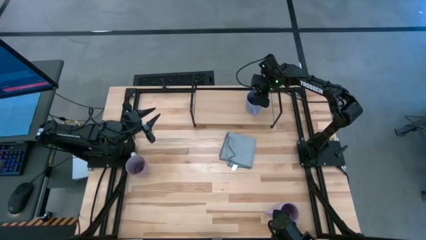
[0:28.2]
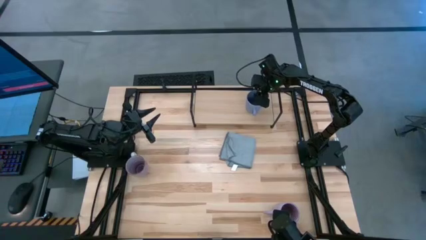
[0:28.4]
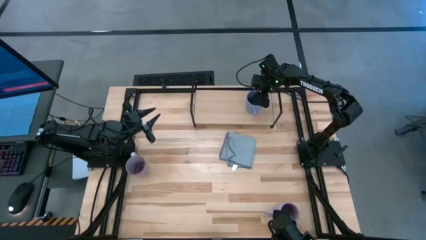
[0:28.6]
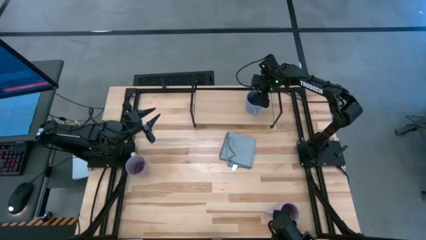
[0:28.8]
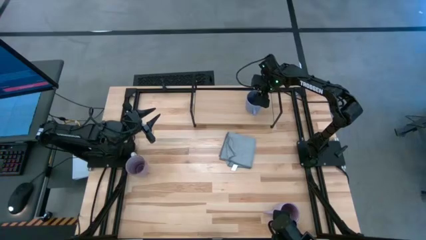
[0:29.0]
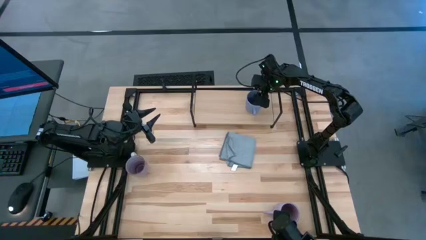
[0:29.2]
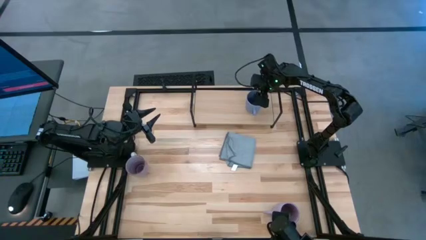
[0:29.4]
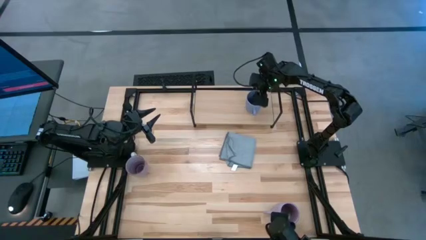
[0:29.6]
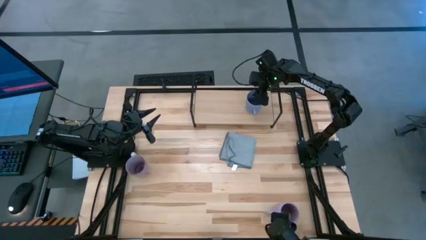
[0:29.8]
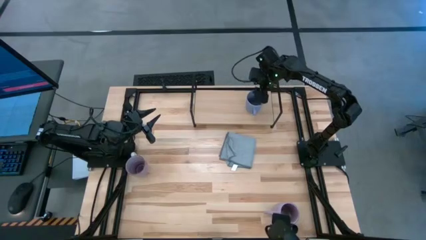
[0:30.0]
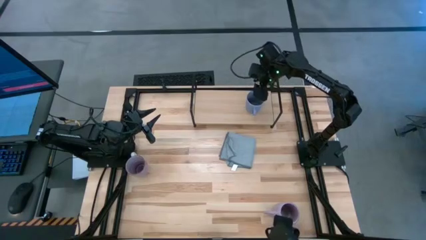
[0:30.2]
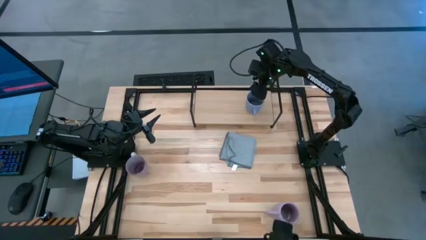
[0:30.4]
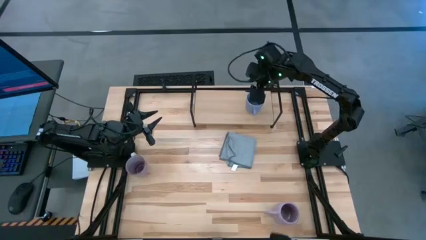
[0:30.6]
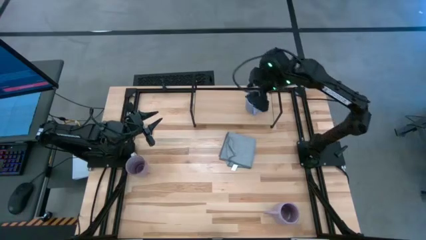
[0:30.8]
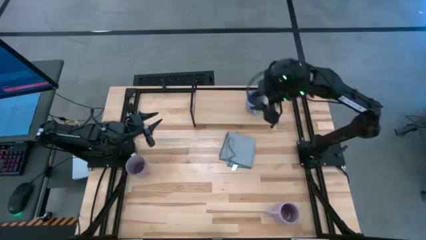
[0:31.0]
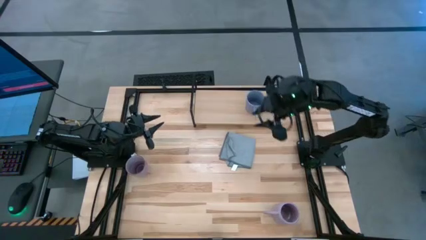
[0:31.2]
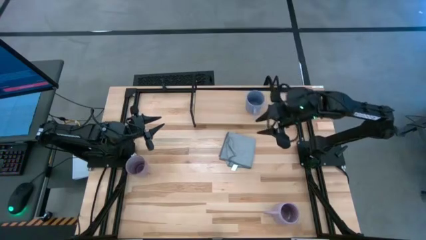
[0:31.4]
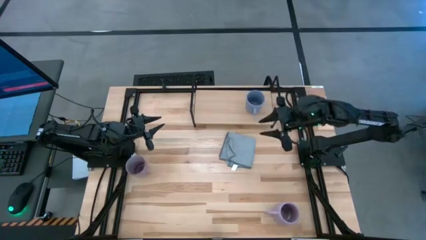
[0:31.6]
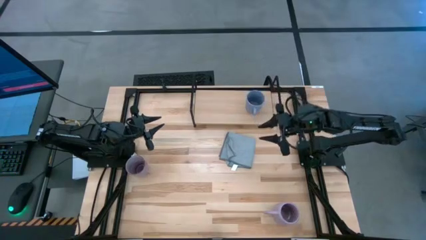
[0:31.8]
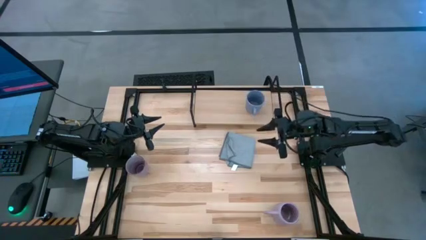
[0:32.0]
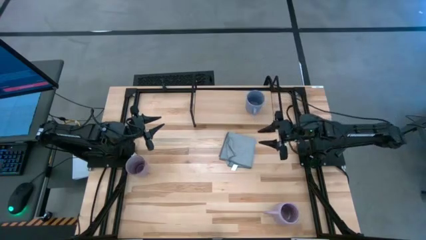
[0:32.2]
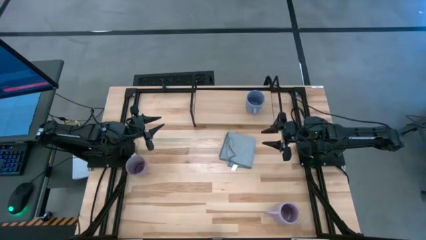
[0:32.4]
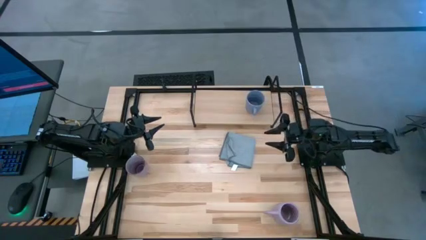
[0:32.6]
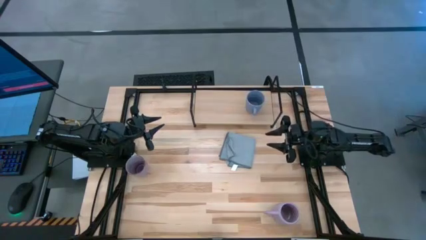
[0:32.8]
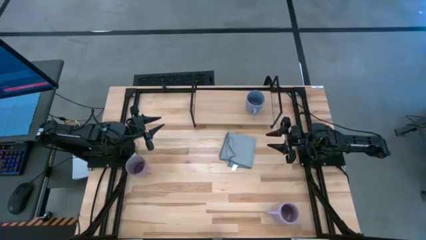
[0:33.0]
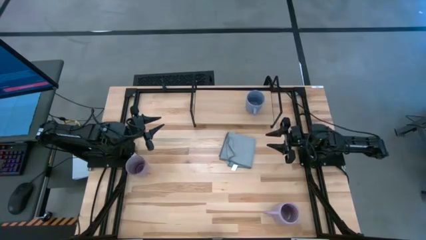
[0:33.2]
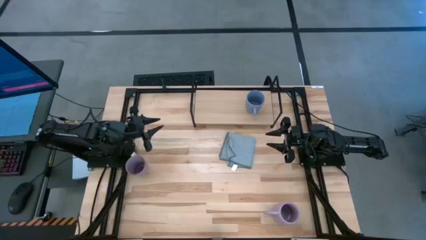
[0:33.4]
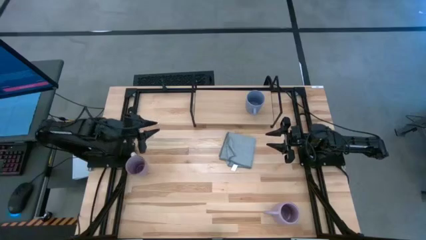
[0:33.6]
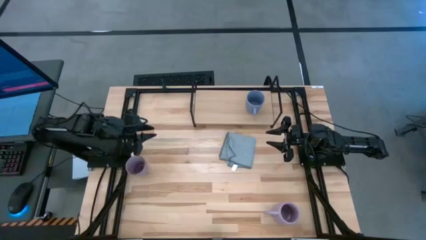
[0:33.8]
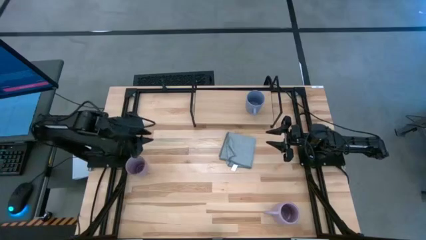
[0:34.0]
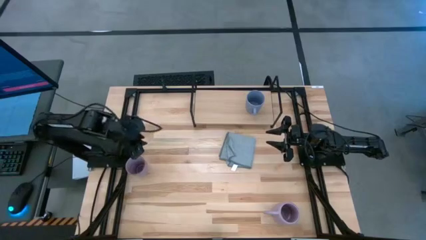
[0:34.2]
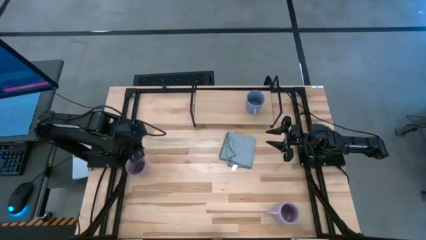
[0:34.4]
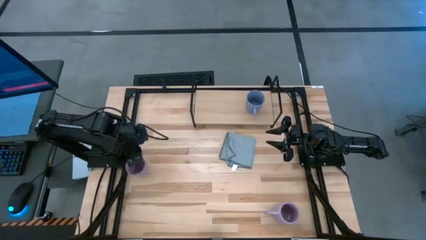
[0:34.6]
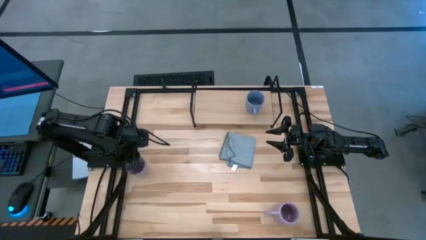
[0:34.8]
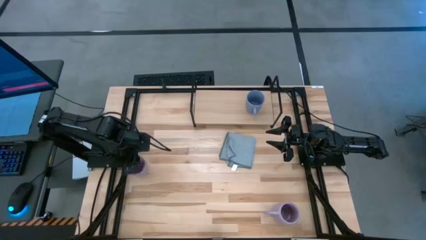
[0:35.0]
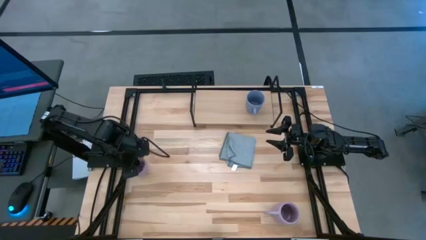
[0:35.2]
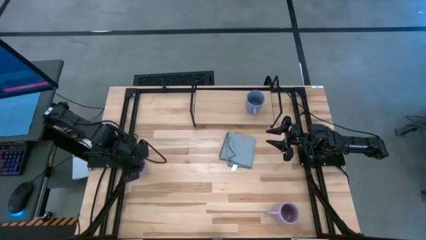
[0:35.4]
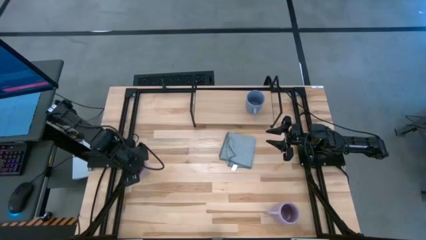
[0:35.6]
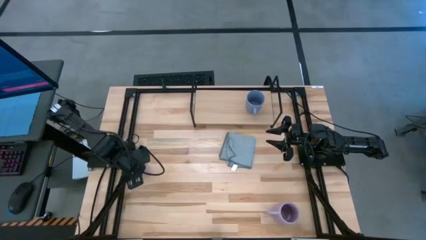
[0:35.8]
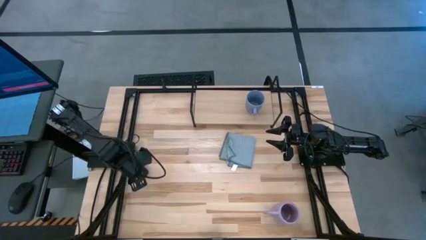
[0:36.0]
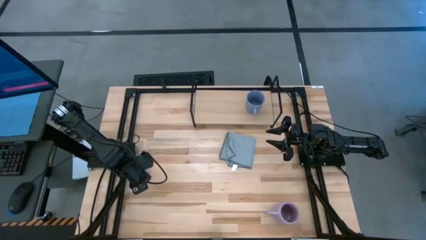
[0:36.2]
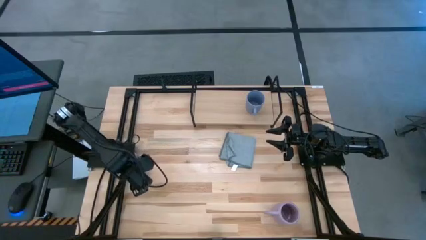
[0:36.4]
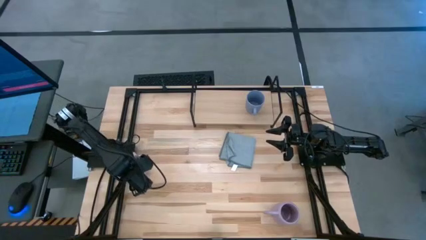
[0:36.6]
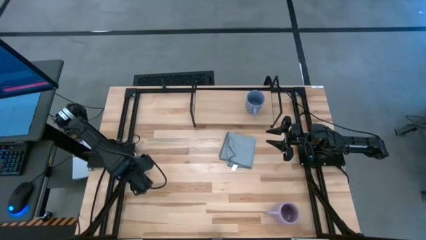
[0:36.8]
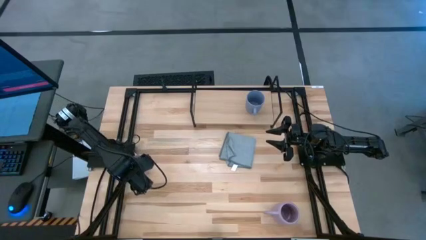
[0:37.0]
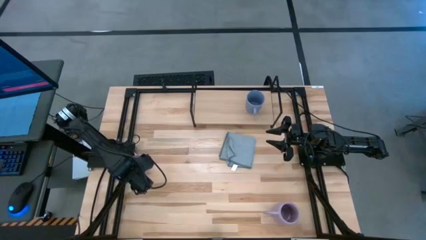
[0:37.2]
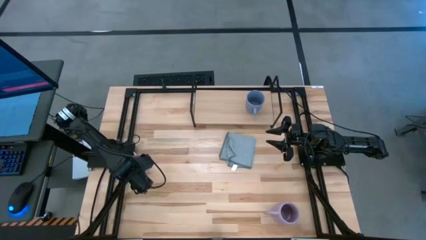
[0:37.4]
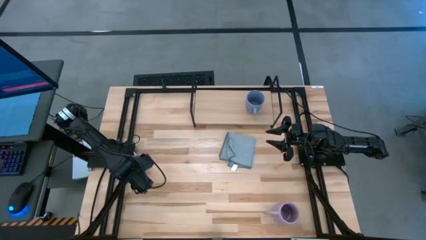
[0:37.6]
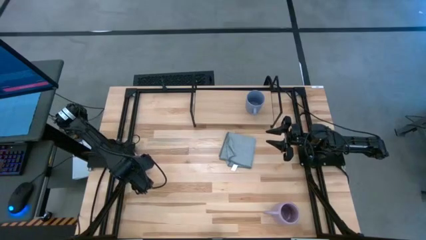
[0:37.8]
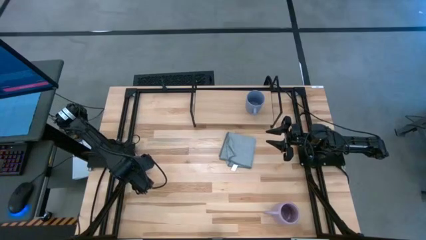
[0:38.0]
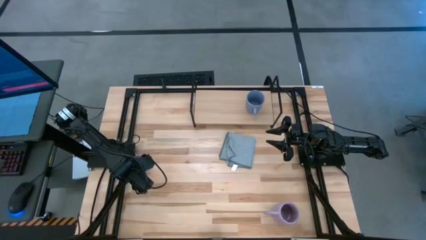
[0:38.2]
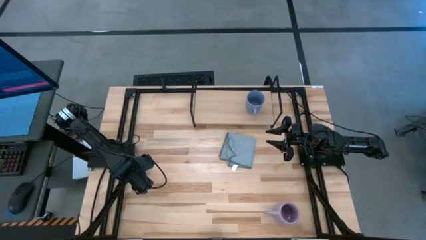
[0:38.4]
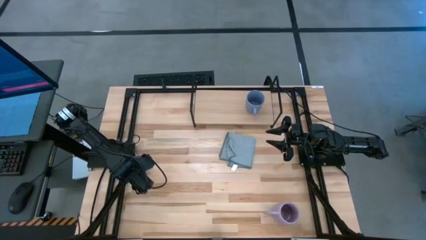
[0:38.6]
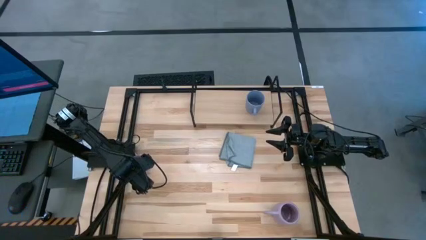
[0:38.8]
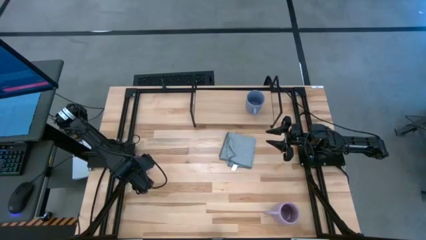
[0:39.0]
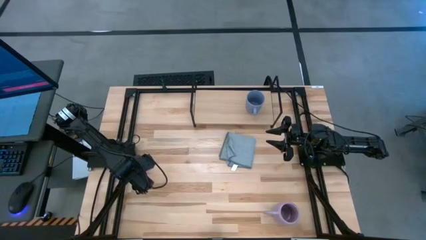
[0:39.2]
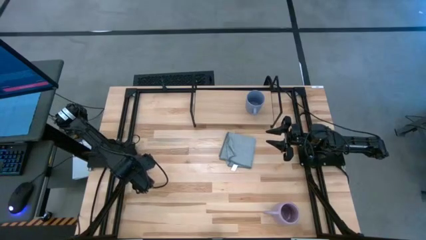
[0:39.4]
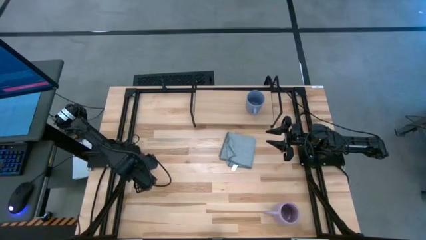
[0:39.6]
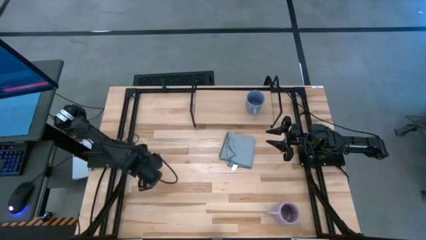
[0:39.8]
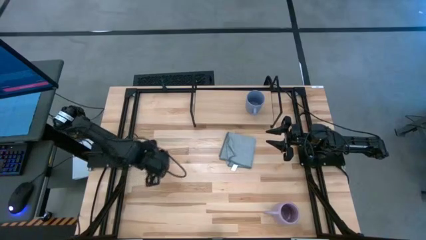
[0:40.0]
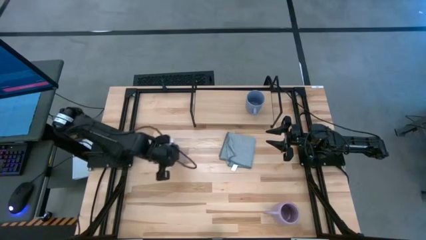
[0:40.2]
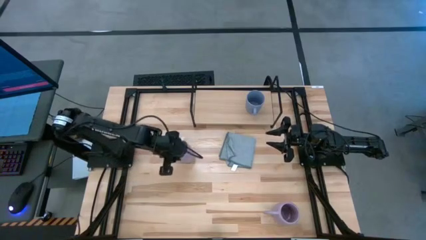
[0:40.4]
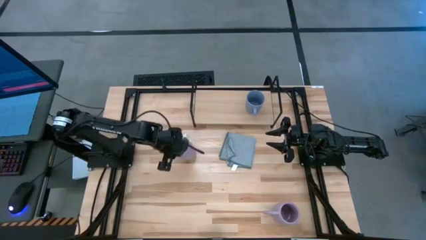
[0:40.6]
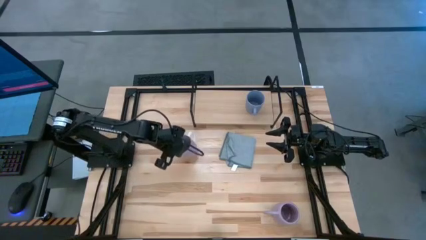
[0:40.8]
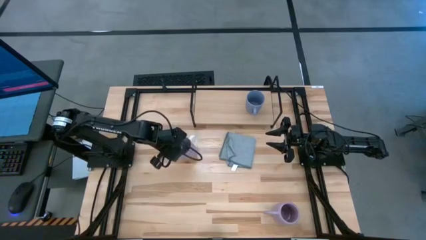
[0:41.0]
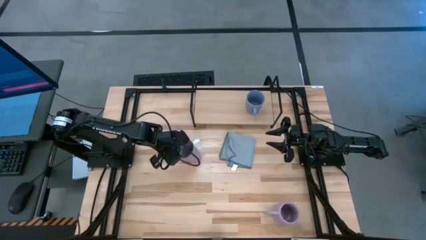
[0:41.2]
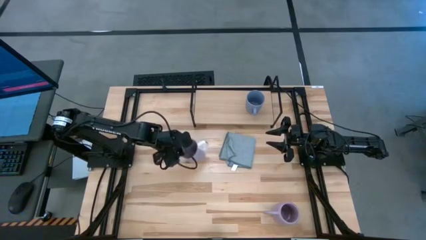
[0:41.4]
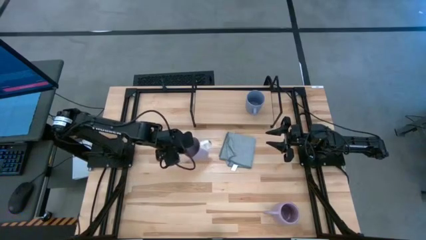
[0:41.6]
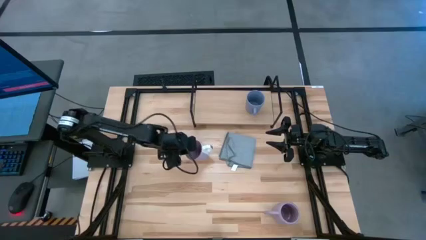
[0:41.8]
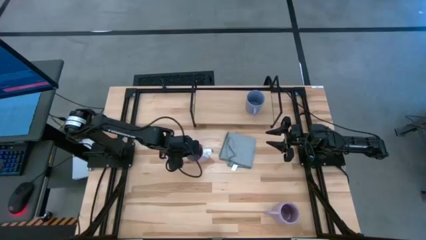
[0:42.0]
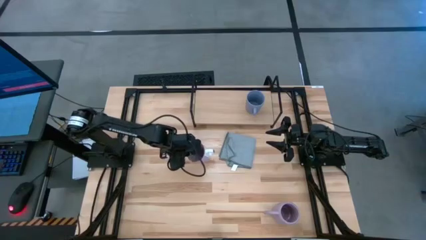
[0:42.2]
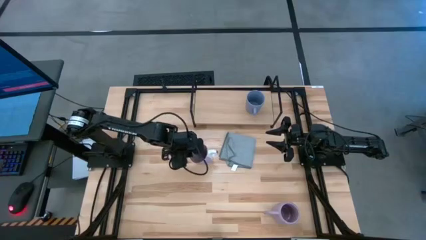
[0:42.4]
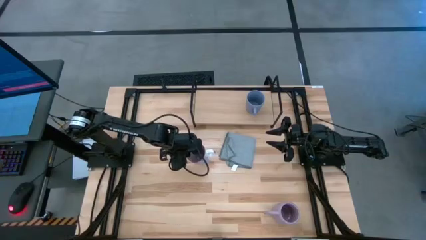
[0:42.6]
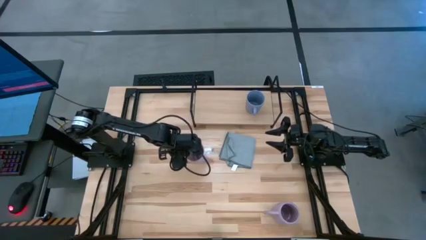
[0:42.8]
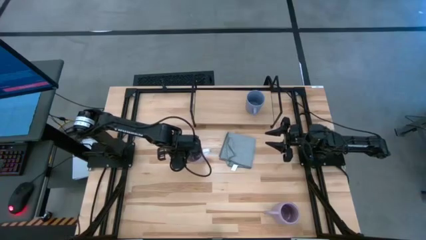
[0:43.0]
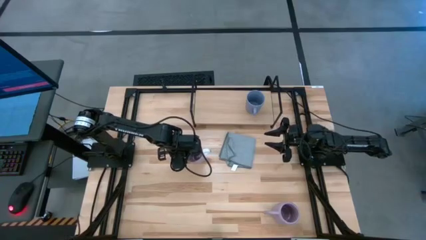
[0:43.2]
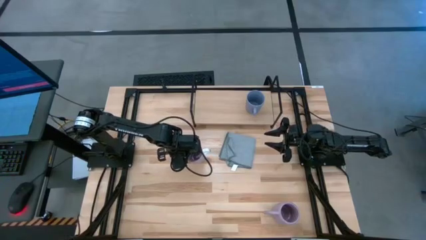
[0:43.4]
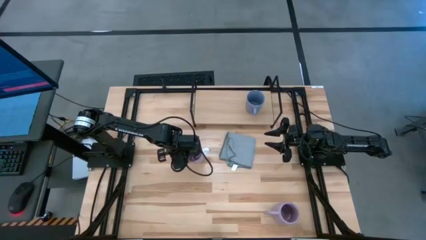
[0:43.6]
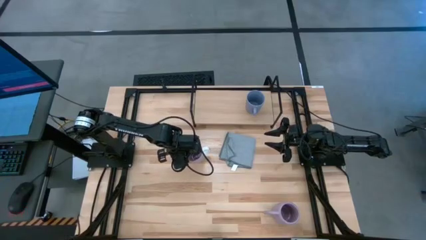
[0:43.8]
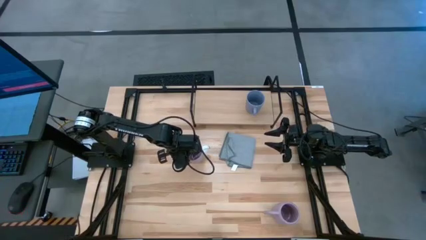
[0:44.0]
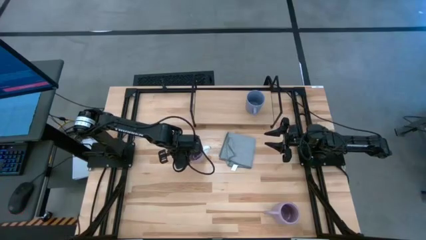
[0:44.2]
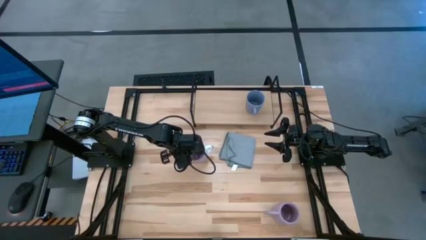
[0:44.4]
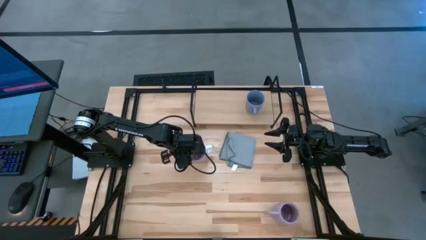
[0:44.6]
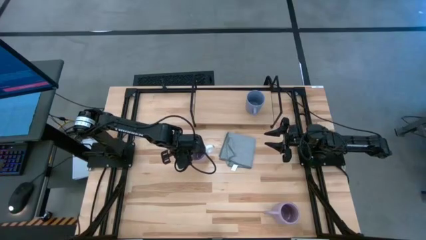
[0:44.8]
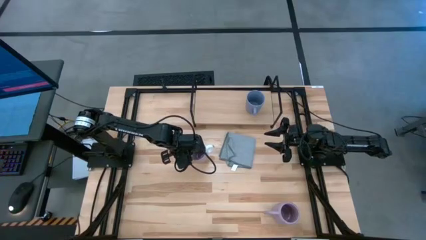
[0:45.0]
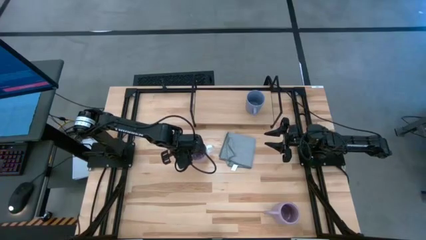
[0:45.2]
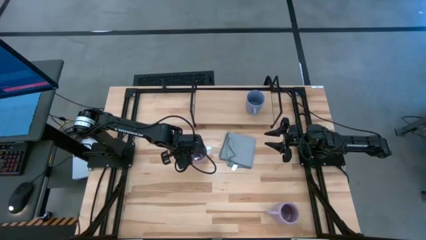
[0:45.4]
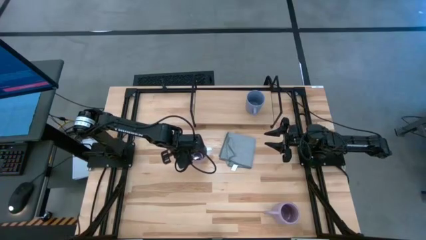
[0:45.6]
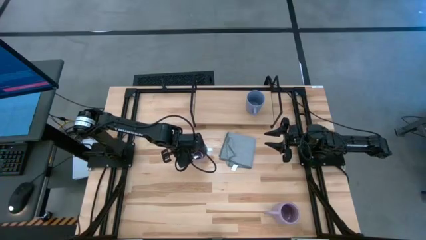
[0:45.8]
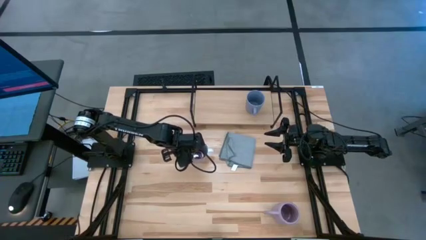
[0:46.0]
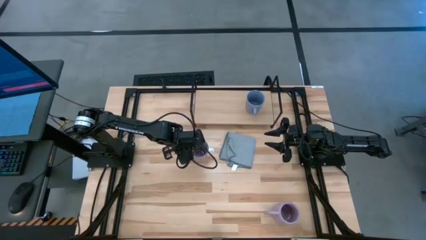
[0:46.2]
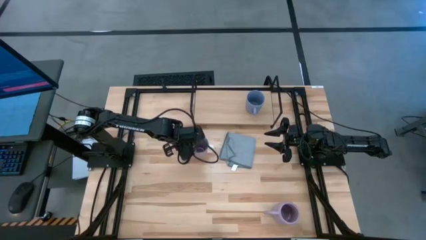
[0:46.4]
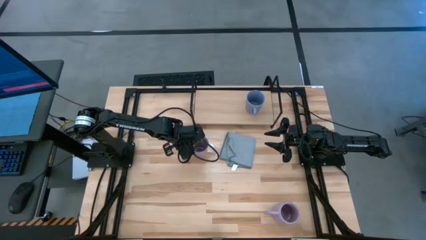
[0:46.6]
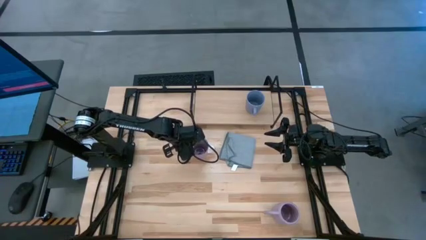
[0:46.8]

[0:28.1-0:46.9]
Task: Stack small to large cups/mugs on shelf
Put the top purple mug on the shelf
